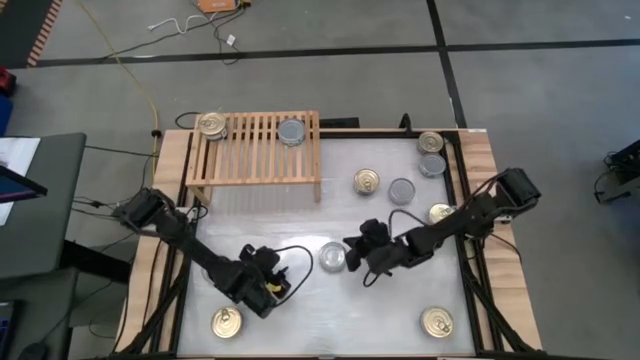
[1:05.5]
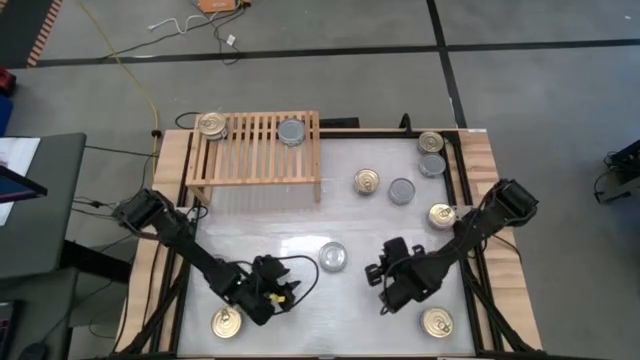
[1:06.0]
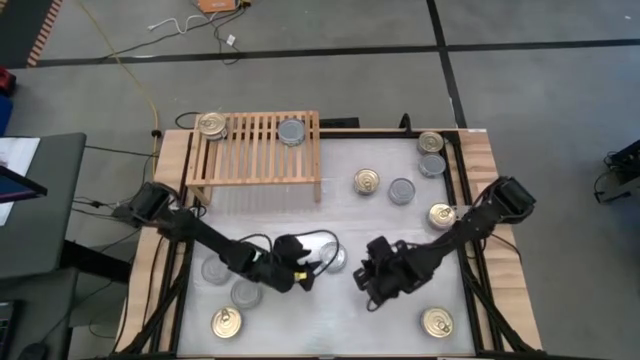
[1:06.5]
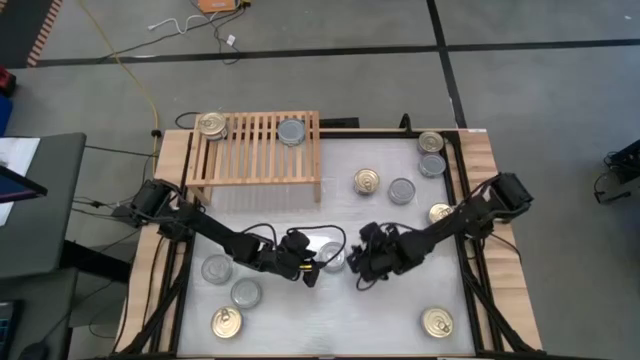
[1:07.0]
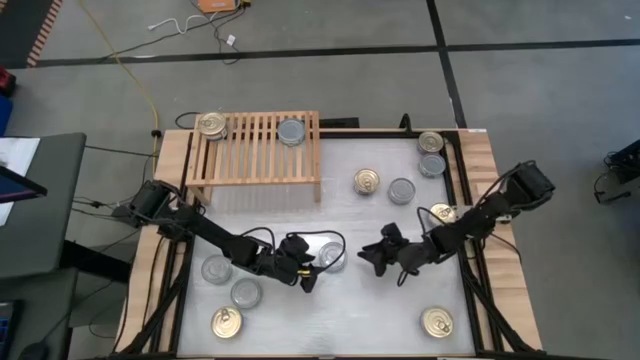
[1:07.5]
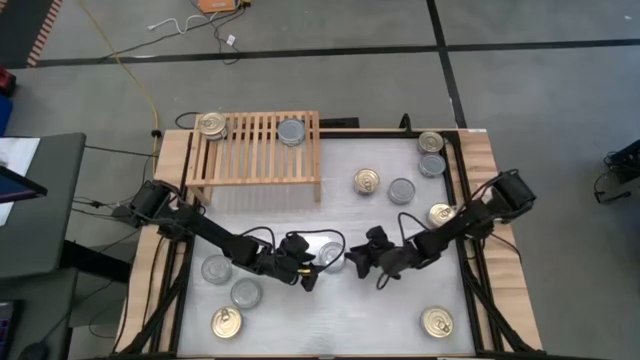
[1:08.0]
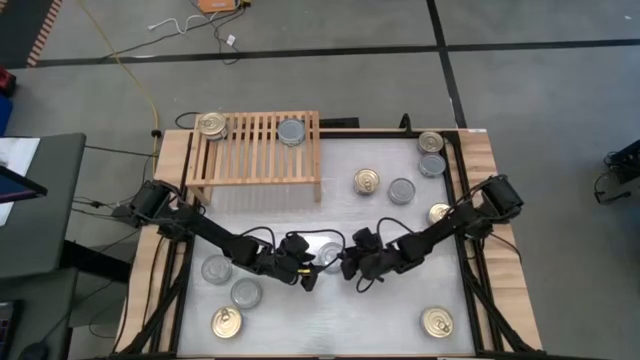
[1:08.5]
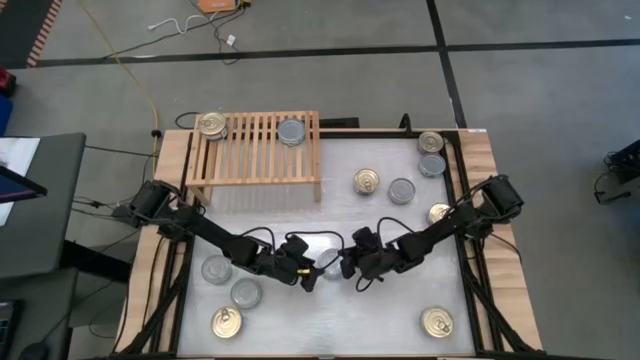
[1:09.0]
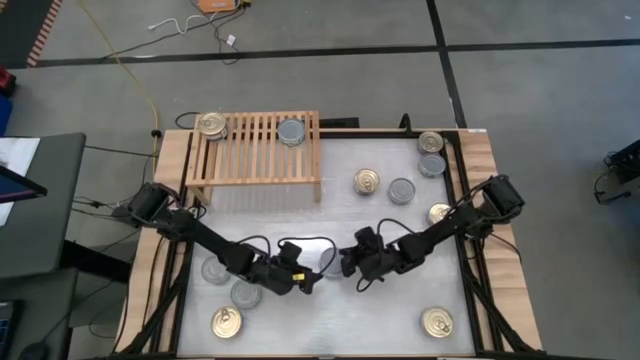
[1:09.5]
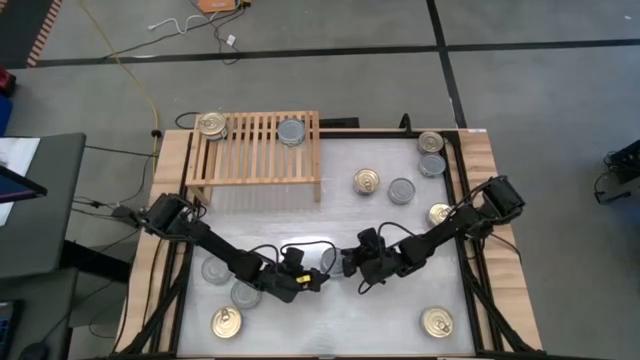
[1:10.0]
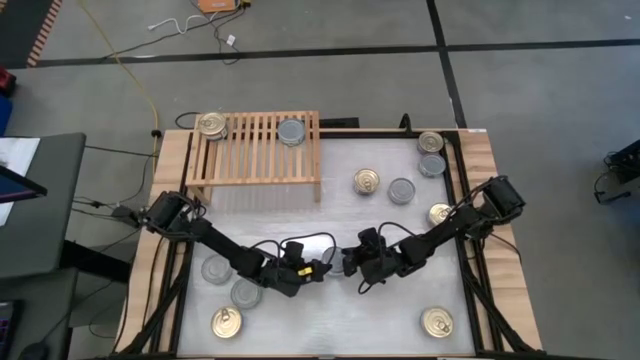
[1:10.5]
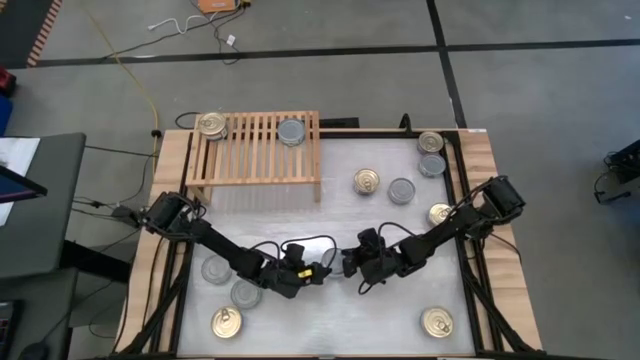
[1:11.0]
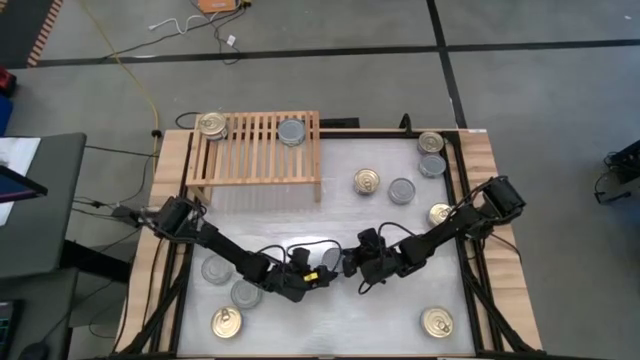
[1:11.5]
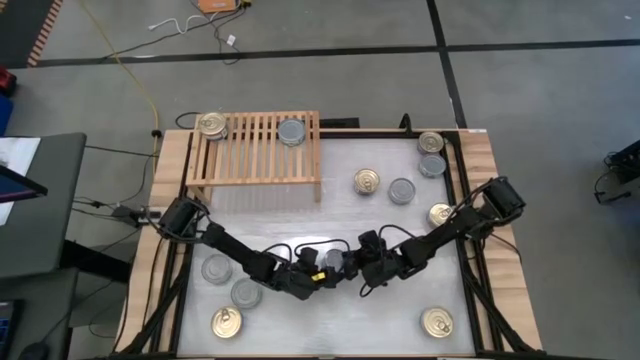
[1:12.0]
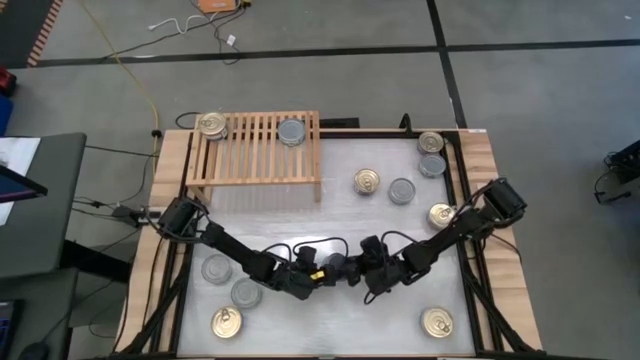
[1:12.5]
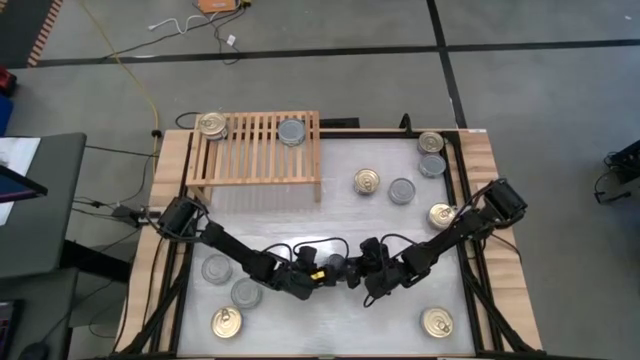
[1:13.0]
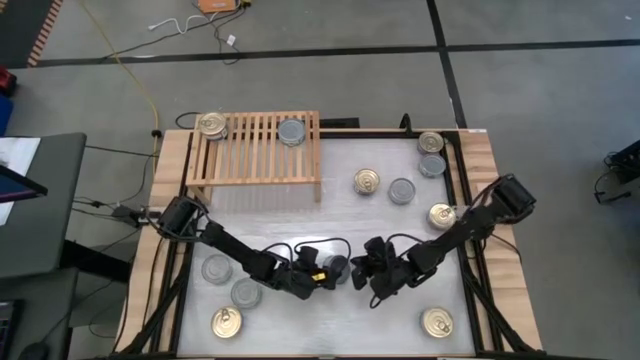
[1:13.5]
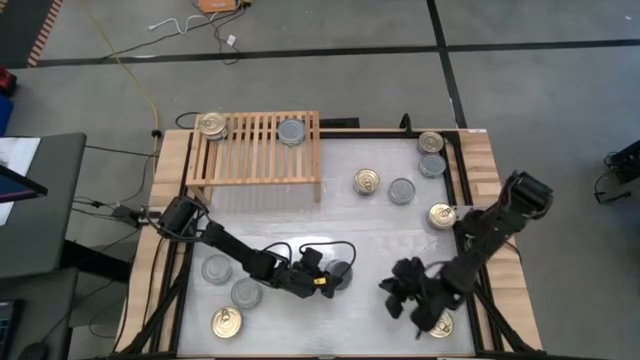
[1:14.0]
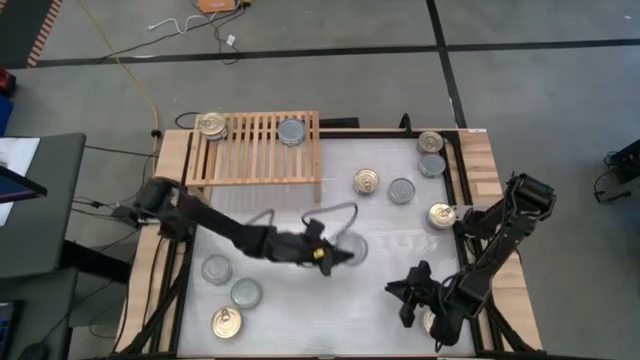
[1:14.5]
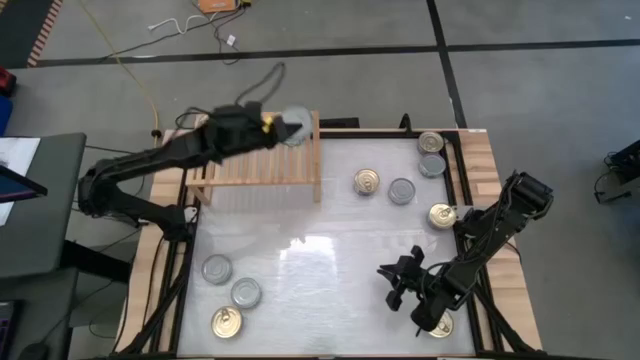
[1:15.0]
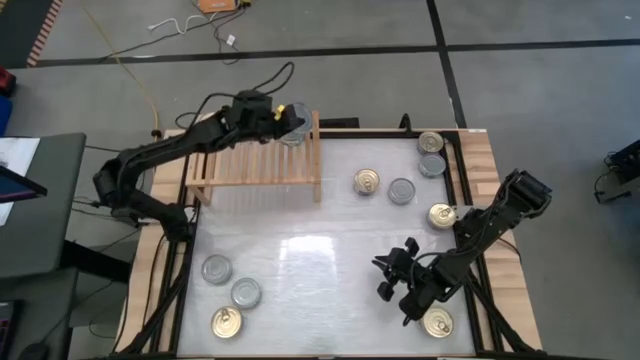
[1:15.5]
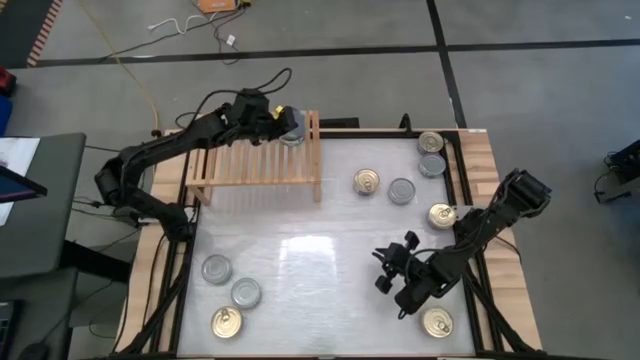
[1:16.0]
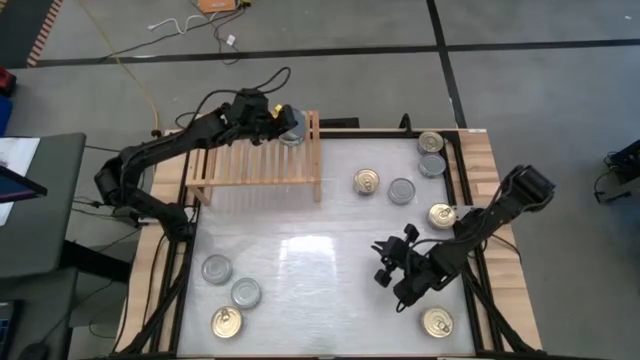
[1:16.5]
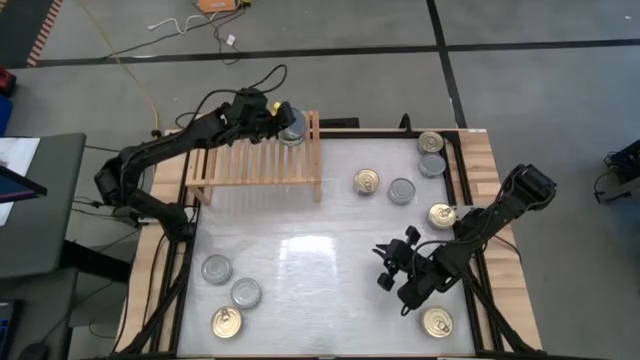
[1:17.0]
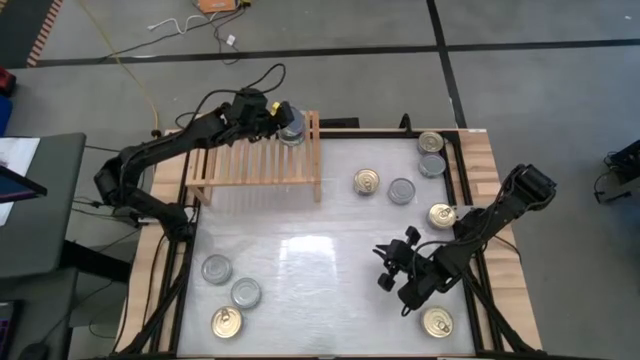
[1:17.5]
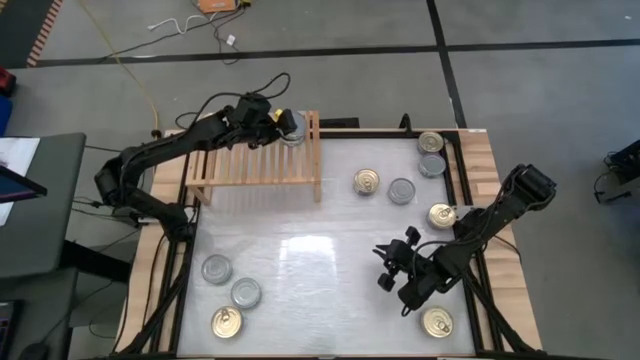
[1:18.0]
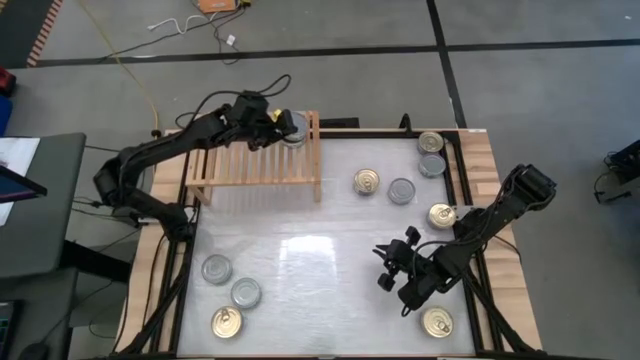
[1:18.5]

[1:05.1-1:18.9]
Task: Stack canned seafood by type on shelf
Stack the green tuna can on top of the green tuna can on the shelf

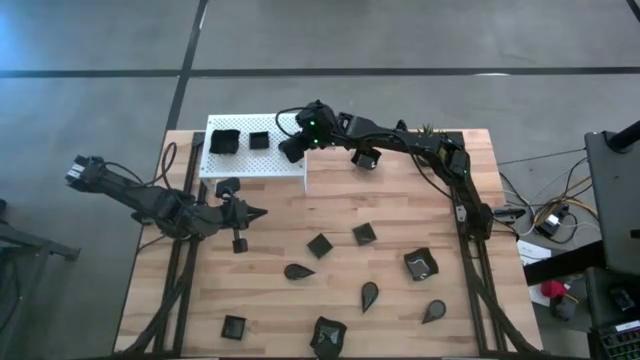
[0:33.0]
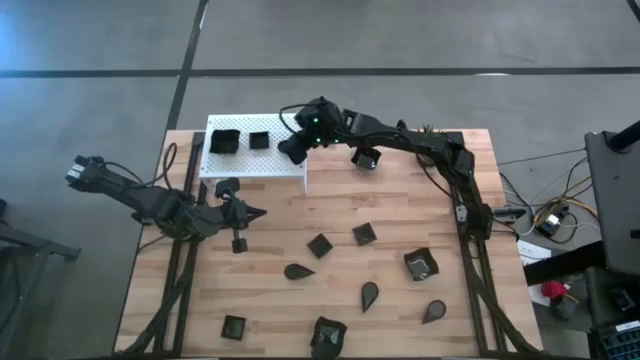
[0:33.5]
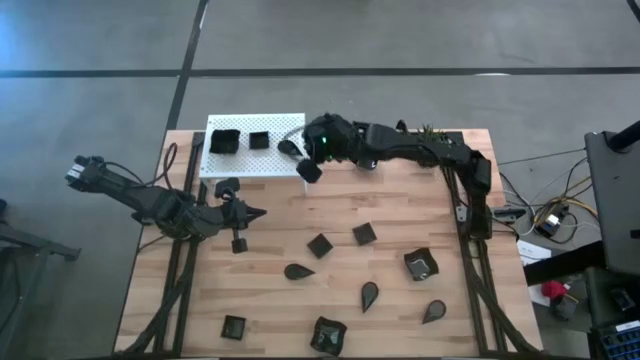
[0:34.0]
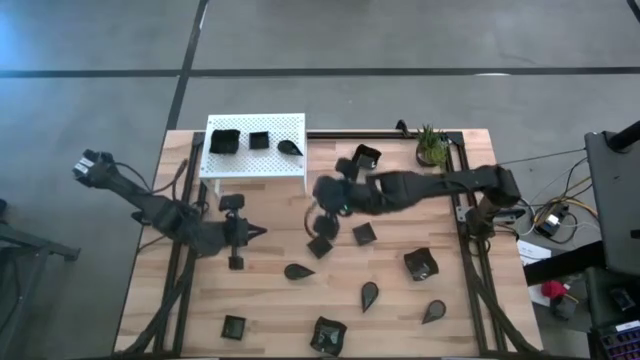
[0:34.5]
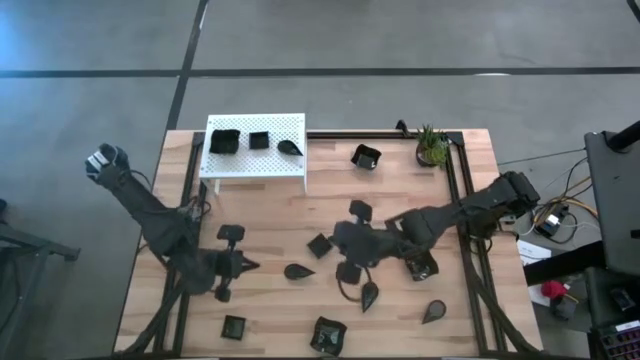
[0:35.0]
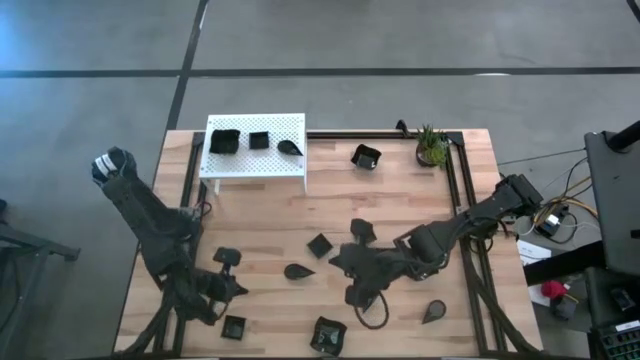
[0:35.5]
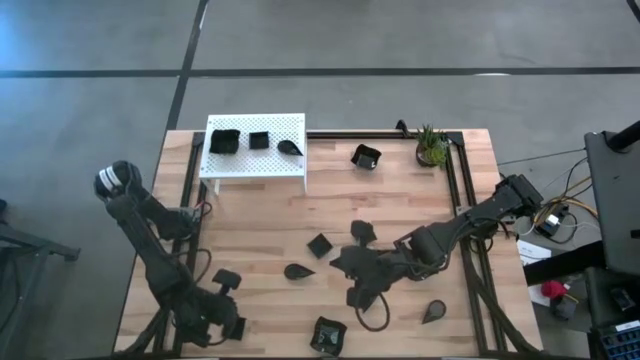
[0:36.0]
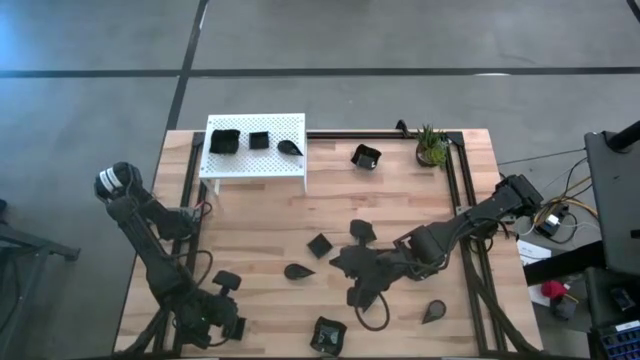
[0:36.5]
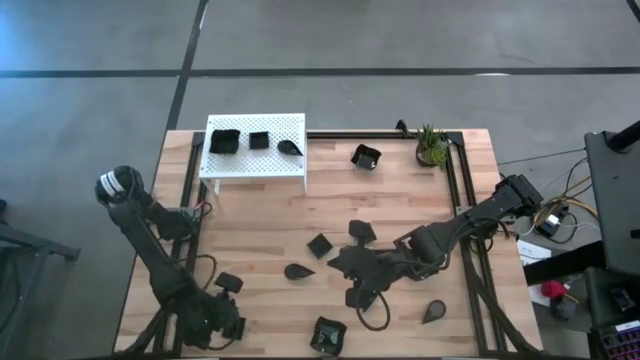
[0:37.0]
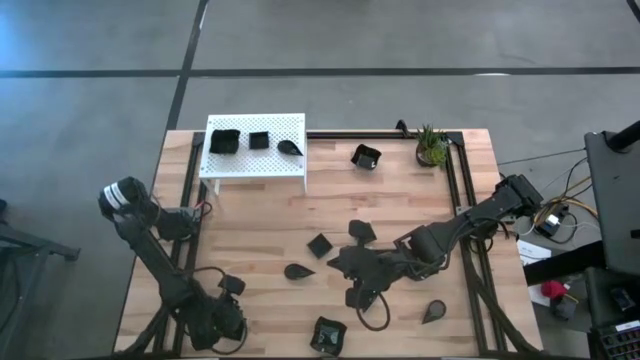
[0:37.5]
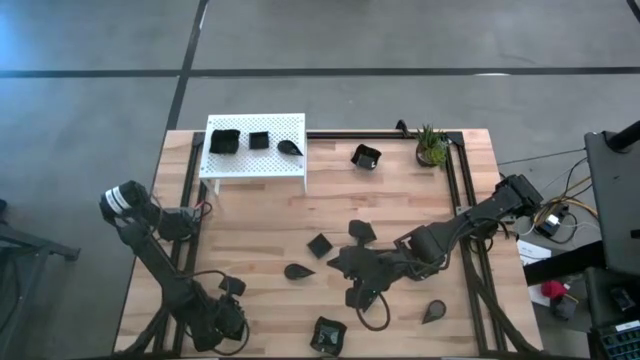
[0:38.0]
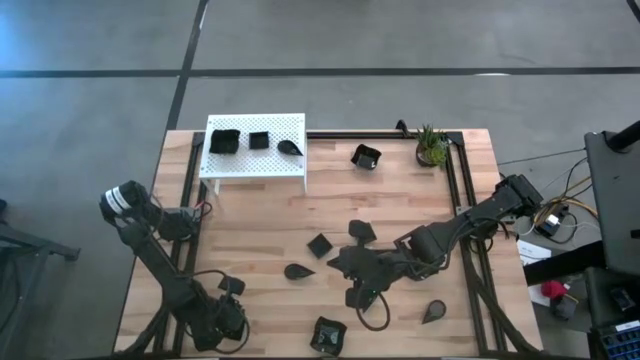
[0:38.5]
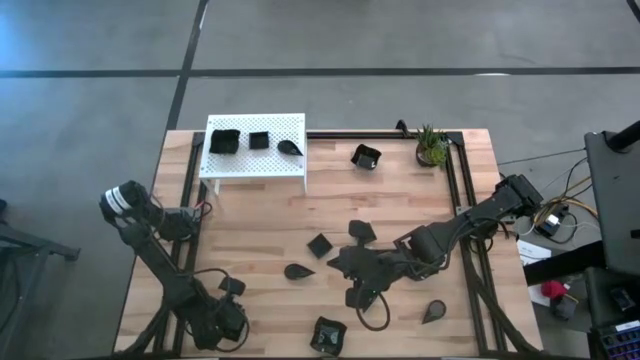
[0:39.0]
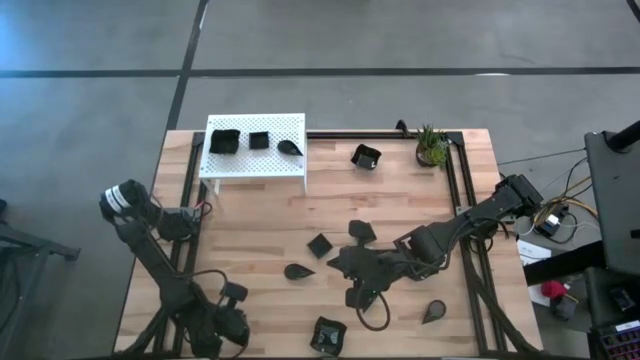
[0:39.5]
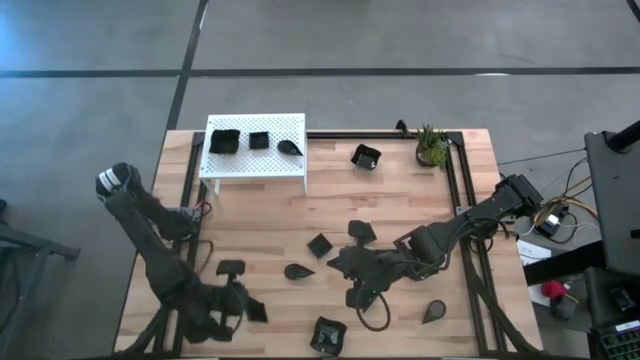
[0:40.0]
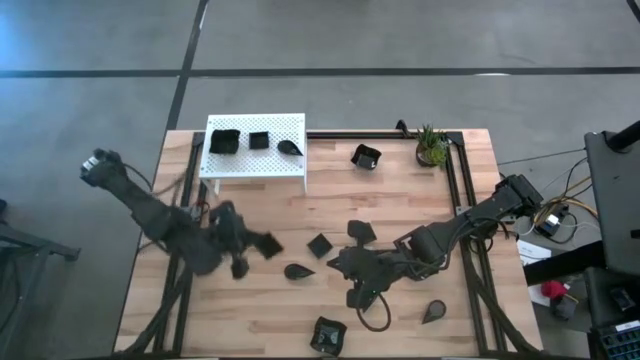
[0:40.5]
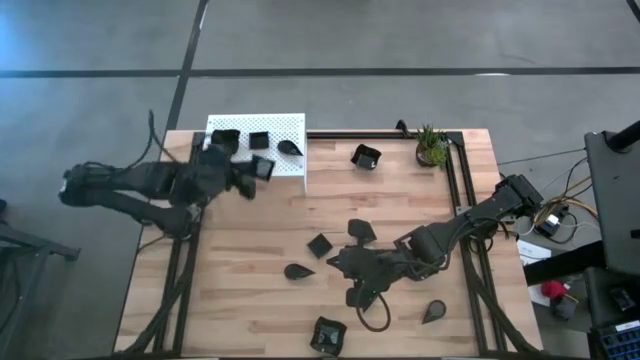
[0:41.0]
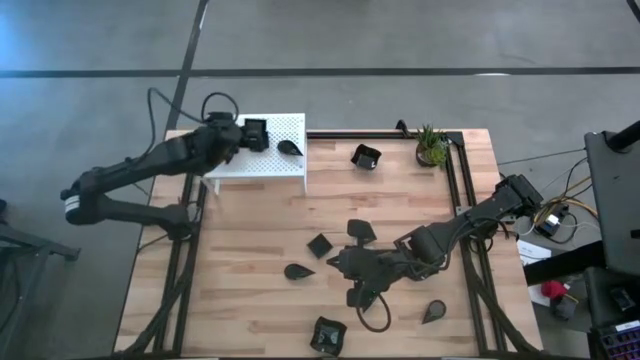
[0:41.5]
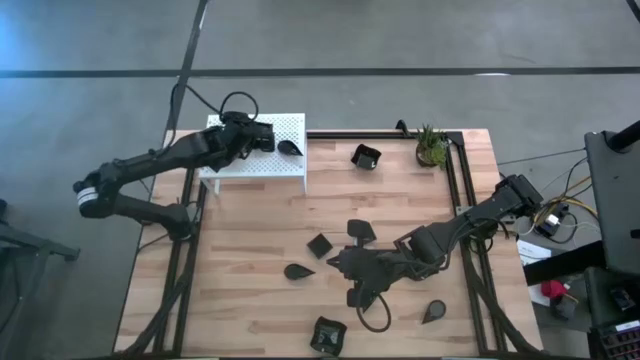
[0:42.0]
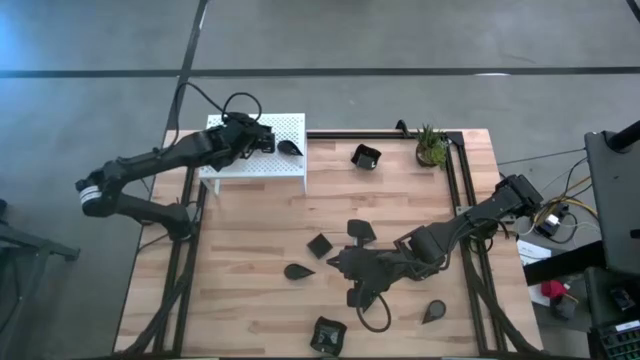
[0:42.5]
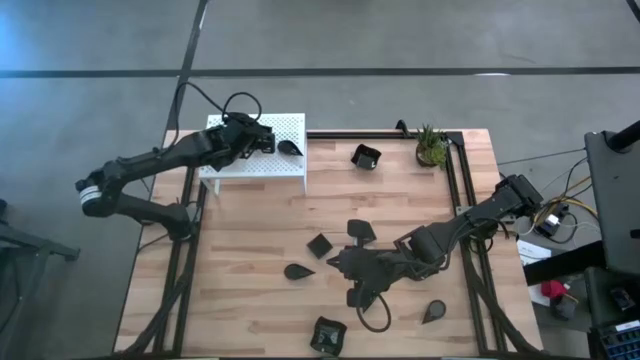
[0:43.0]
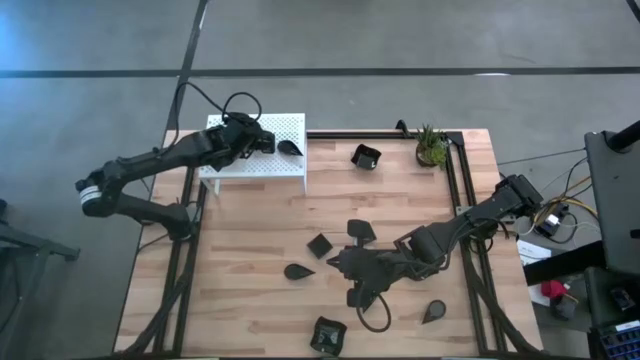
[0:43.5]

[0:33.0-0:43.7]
Task: Pick & Place Mini shaped plates
Stack the square plate on top of the other square plate on the shelf
